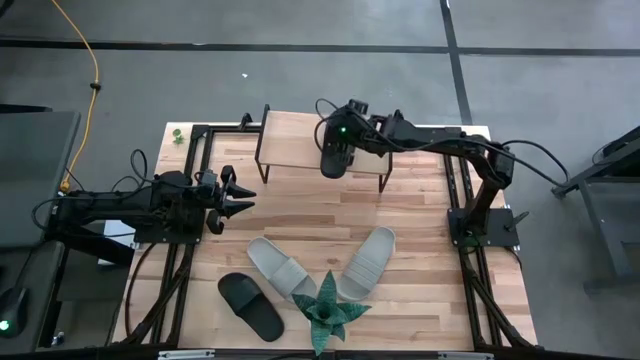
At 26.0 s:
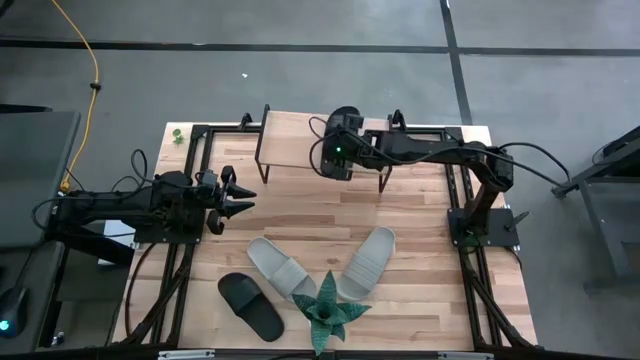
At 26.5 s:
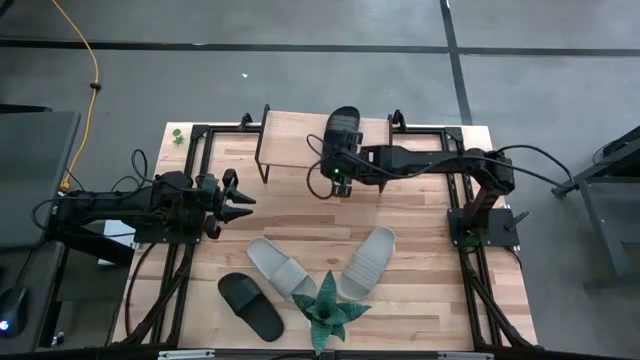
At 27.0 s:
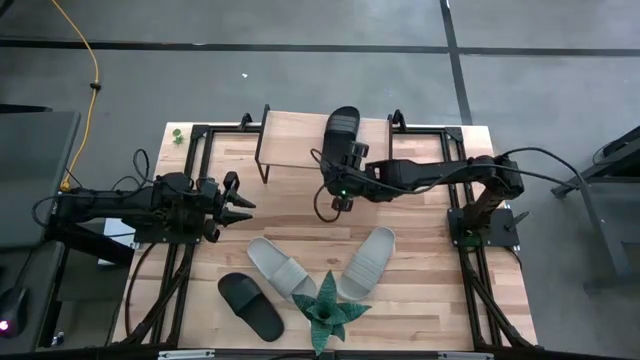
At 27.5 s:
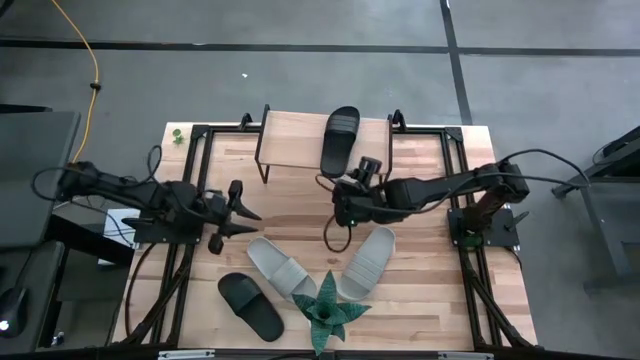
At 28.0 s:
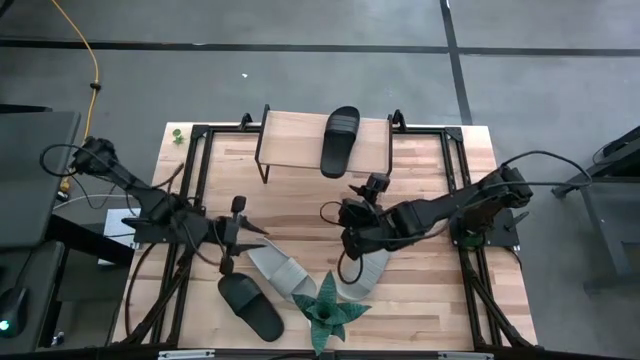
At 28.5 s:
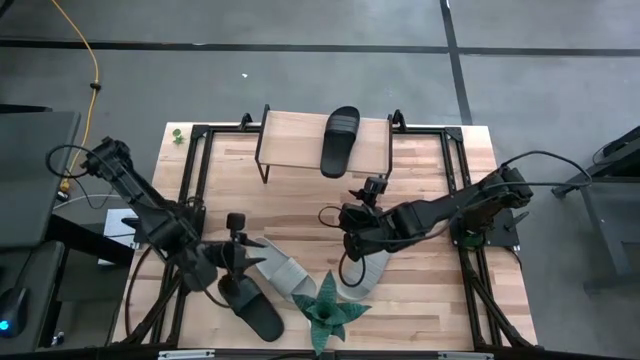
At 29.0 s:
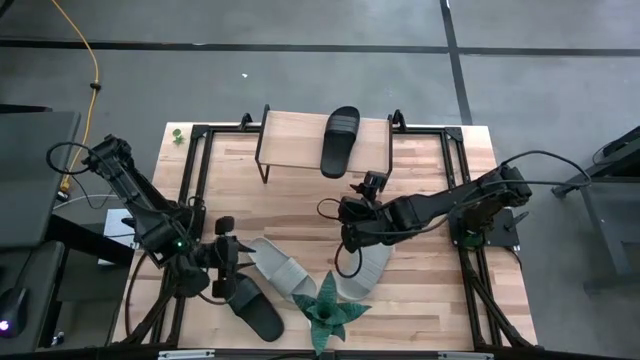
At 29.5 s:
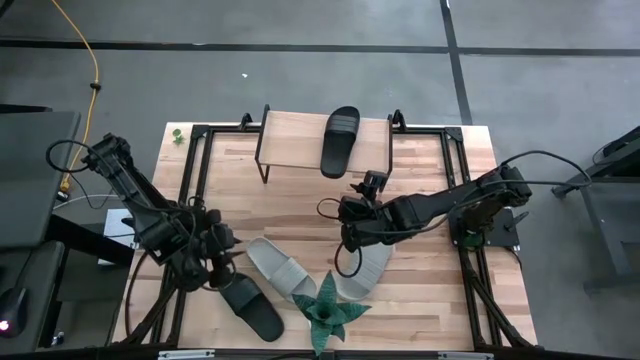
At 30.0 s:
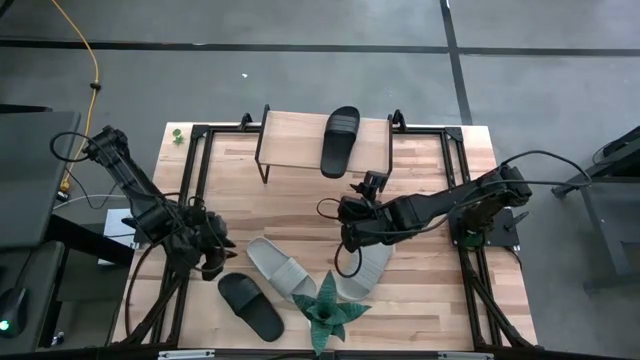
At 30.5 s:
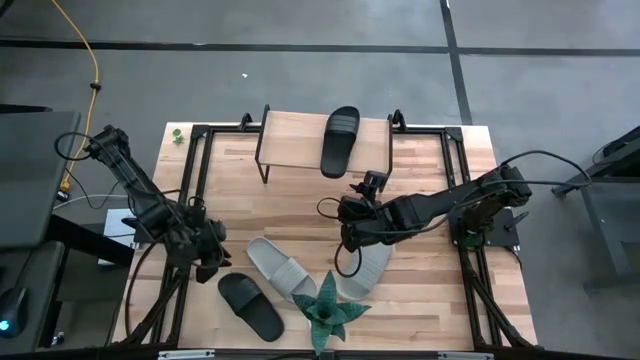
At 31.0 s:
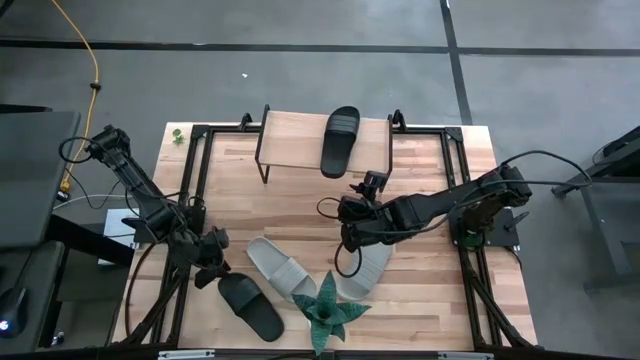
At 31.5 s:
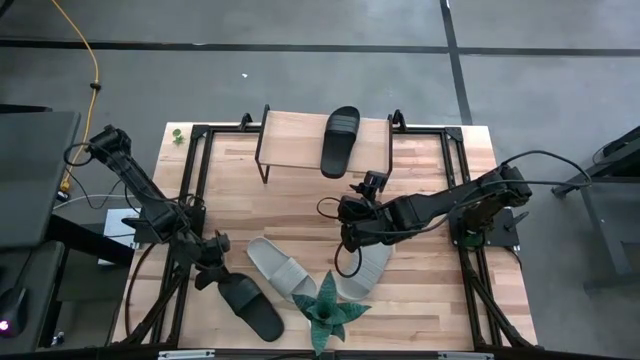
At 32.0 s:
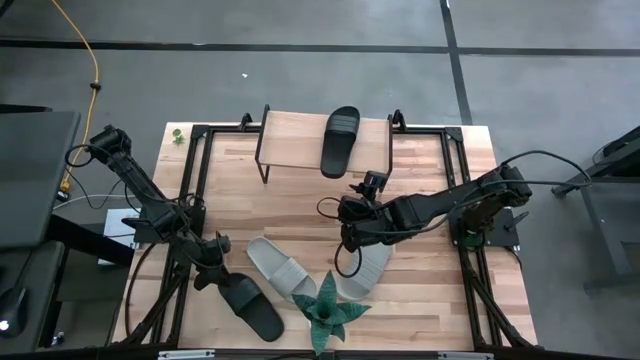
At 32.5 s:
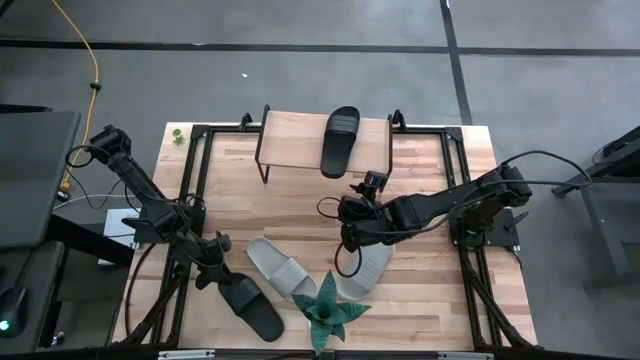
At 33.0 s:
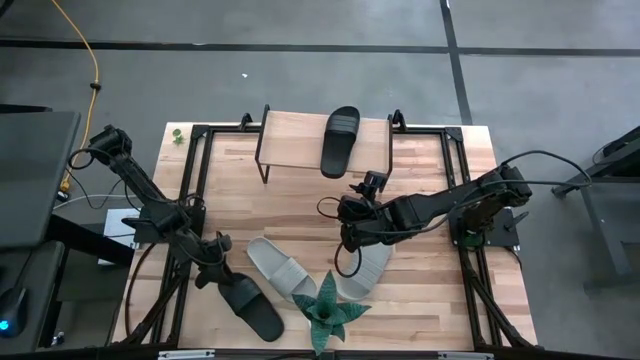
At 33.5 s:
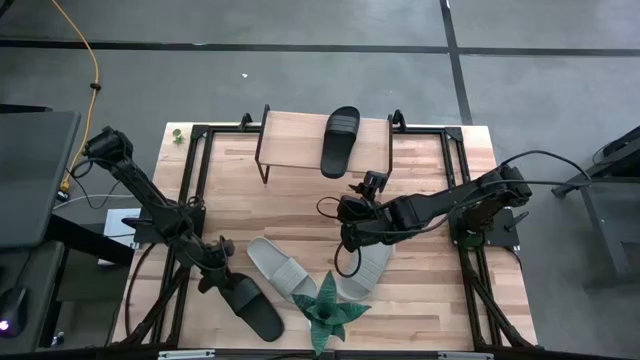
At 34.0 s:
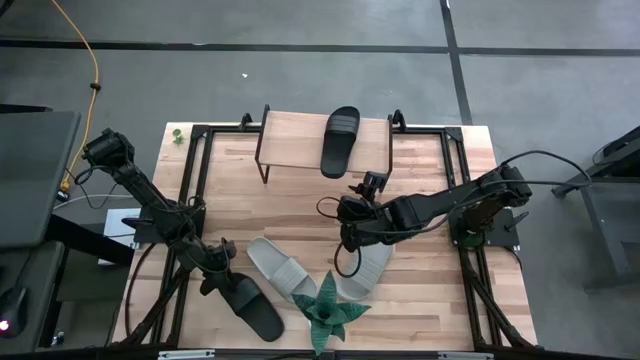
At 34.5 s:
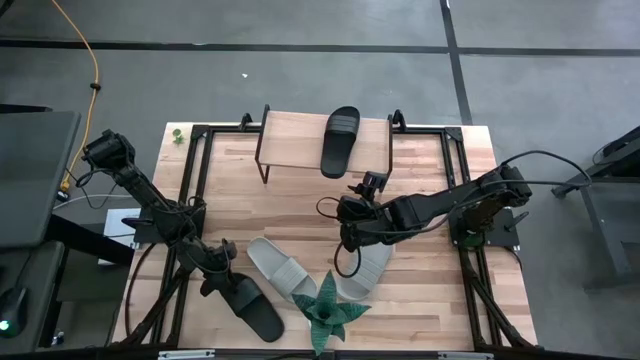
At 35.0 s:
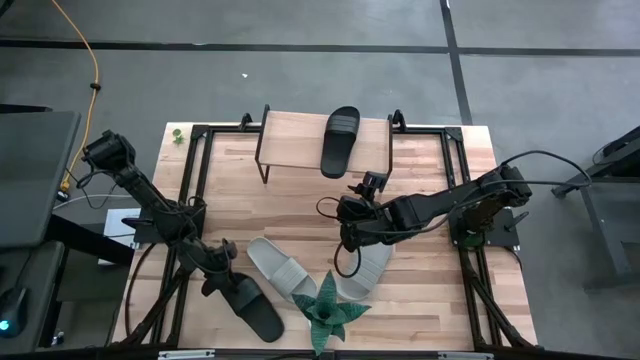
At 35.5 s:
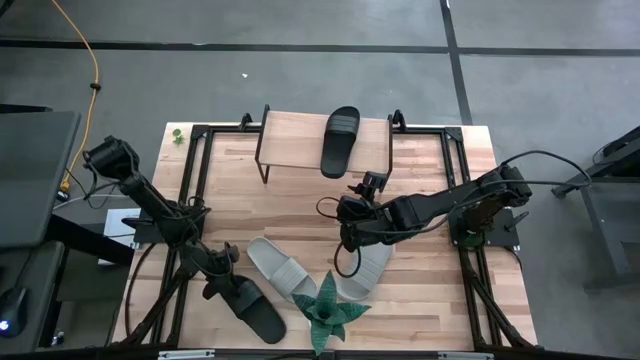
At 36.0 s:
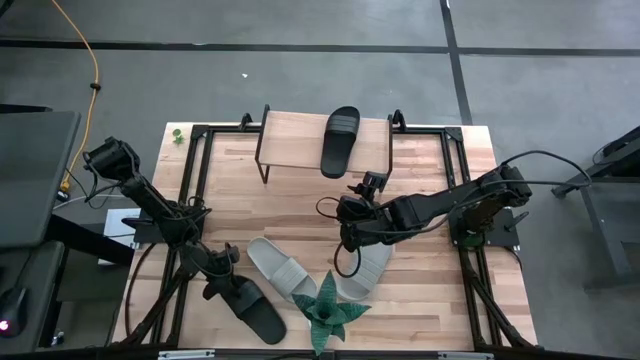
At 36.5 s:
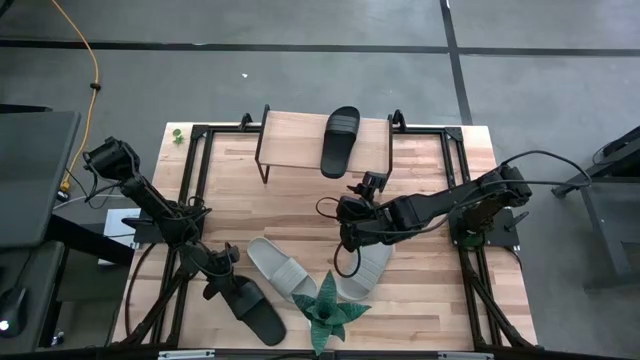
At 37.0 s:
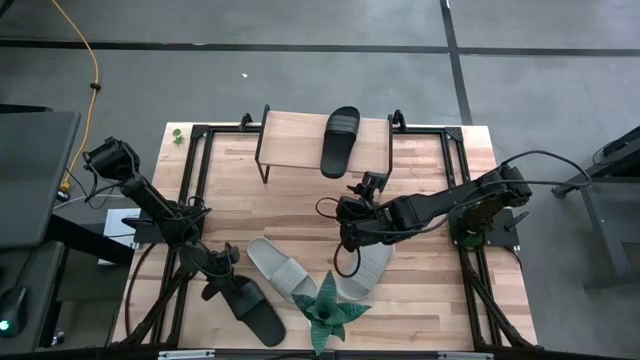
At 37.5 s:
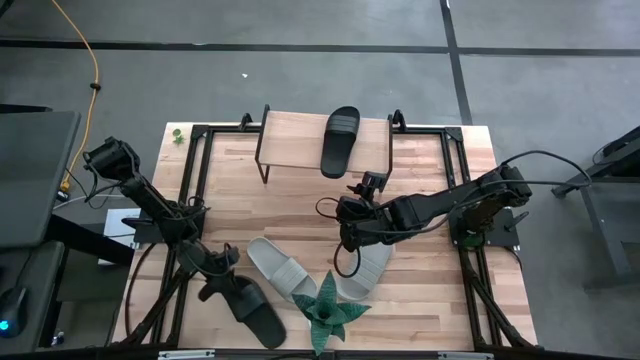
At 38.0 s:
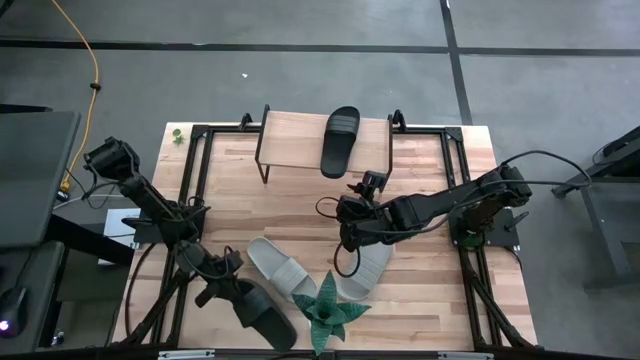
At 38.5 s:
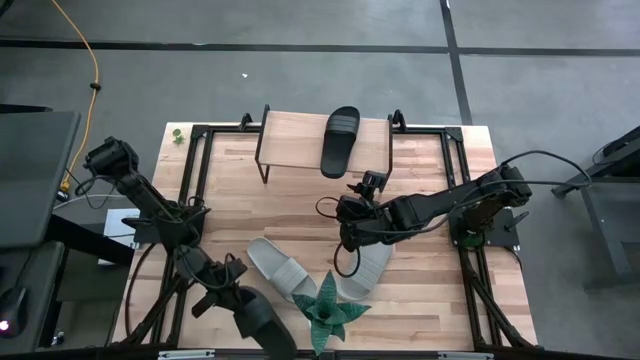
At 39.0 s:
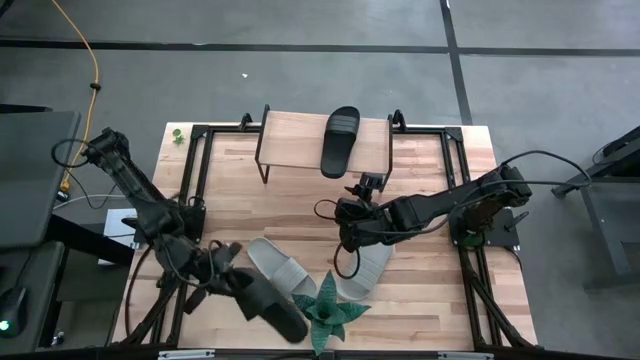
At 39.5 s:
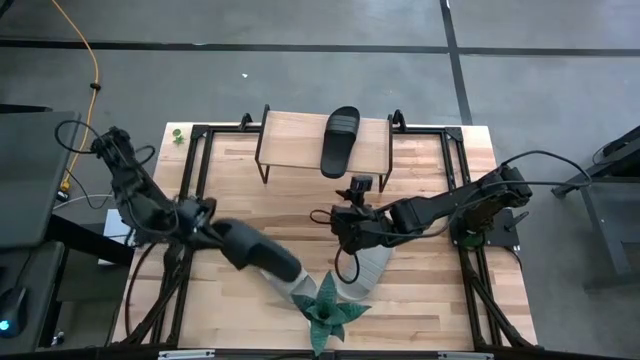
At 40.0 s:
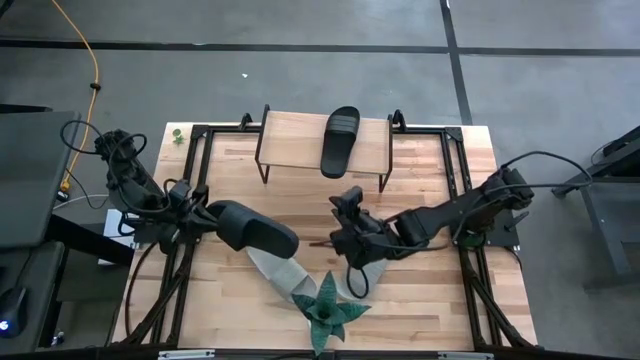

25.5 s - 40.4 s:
Task: Pick and place slides into the shelf
Put the black slipper on the shelf
